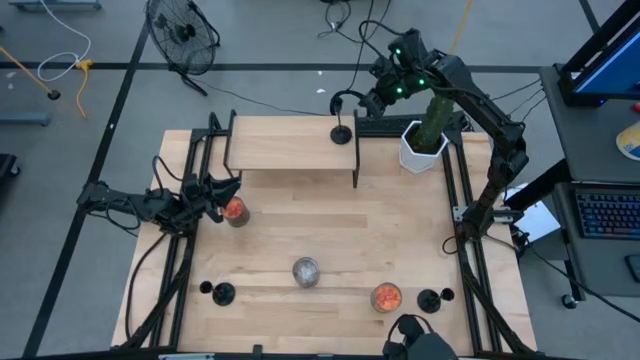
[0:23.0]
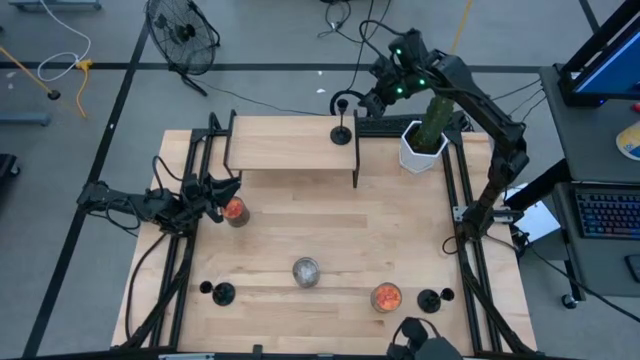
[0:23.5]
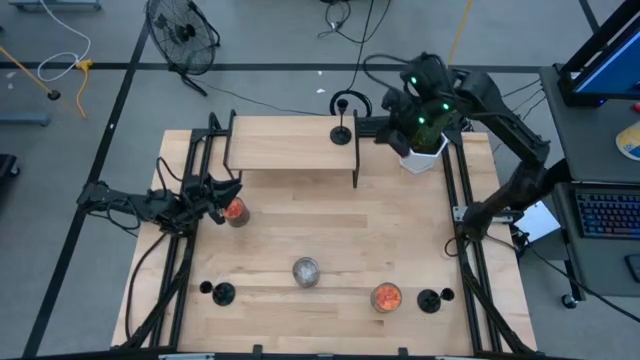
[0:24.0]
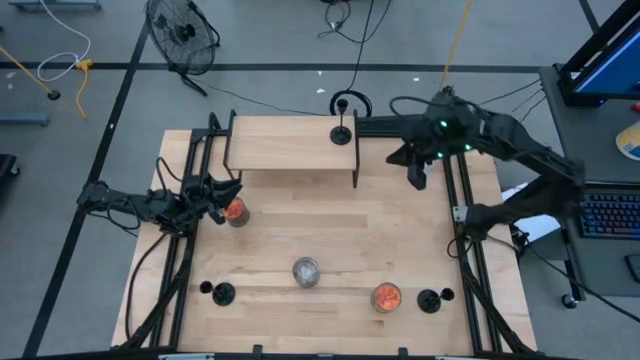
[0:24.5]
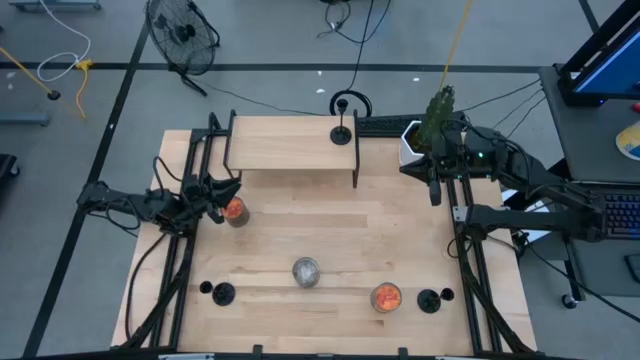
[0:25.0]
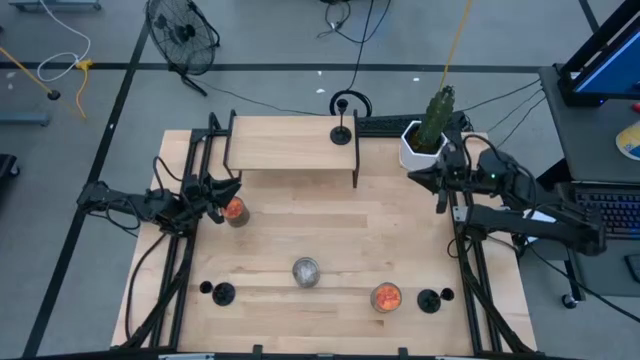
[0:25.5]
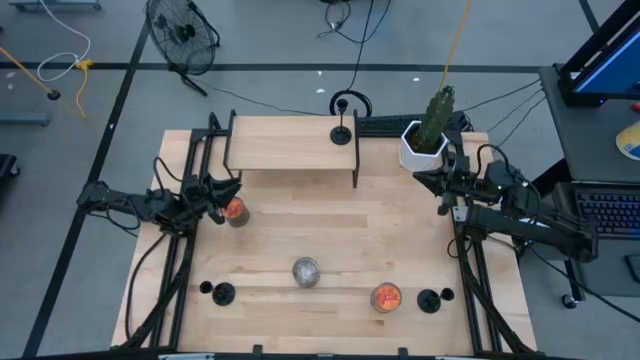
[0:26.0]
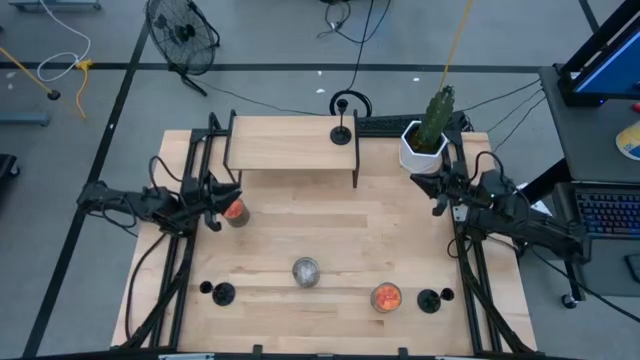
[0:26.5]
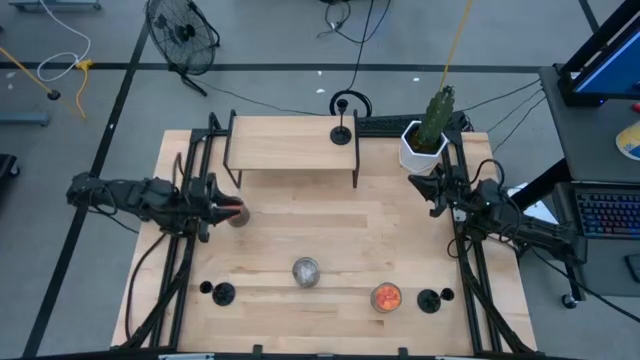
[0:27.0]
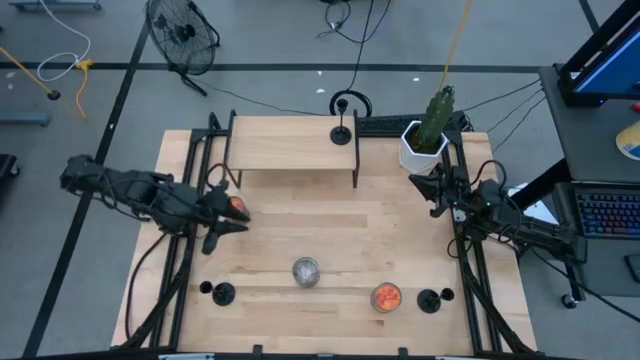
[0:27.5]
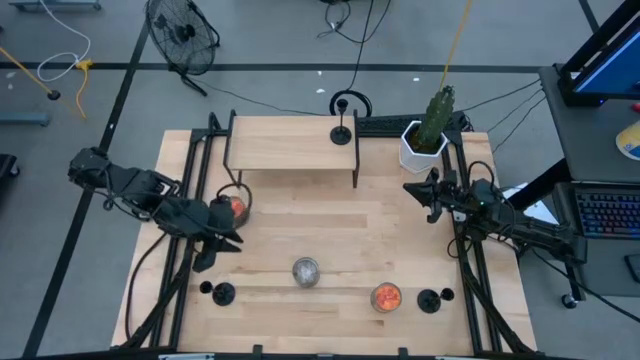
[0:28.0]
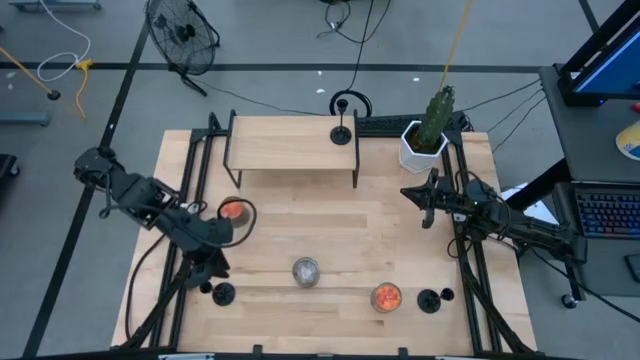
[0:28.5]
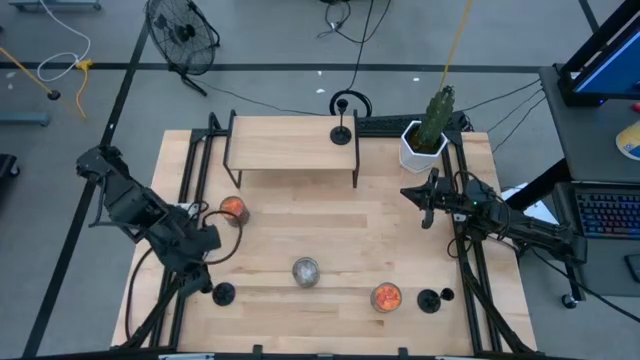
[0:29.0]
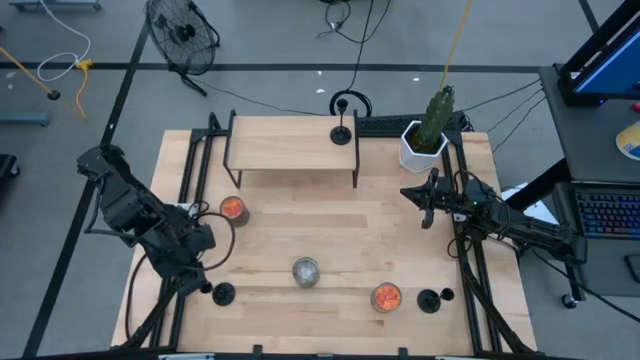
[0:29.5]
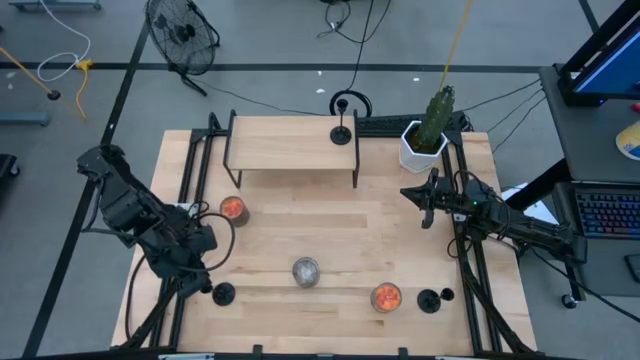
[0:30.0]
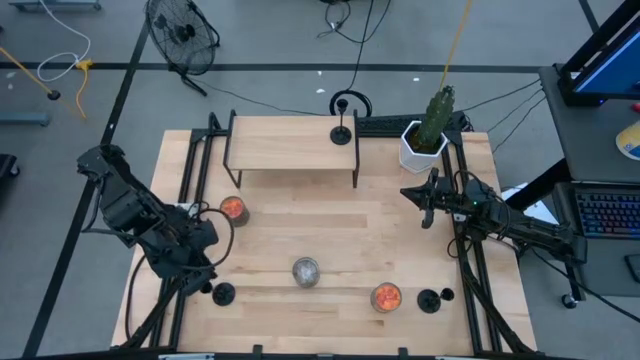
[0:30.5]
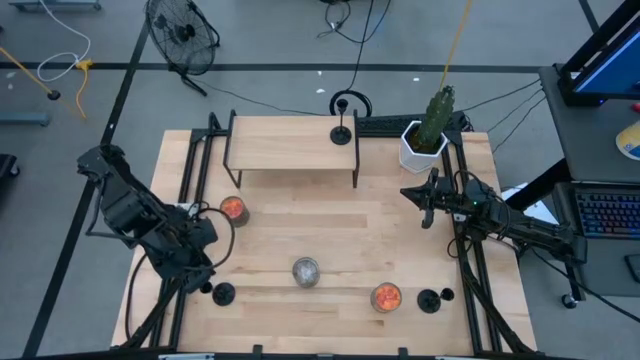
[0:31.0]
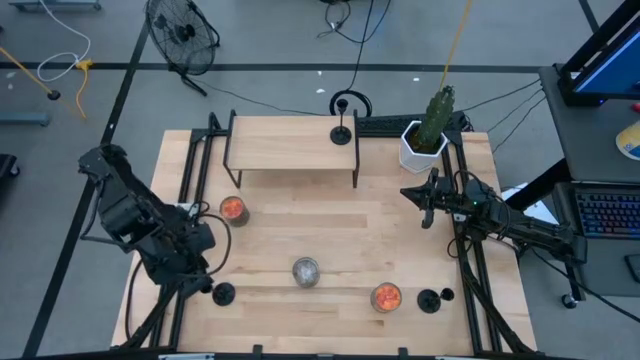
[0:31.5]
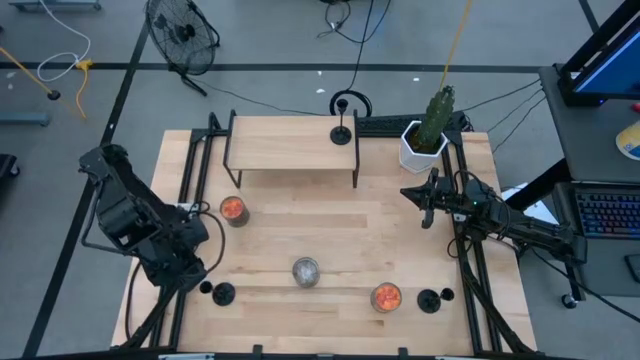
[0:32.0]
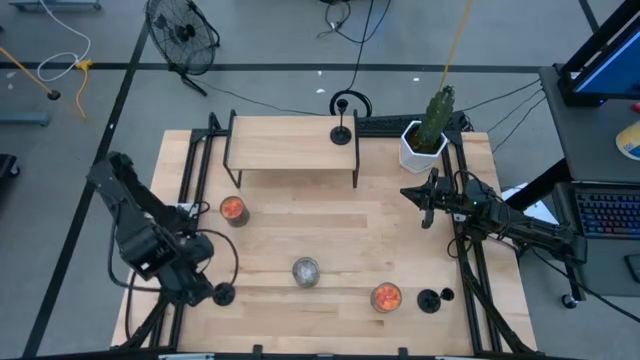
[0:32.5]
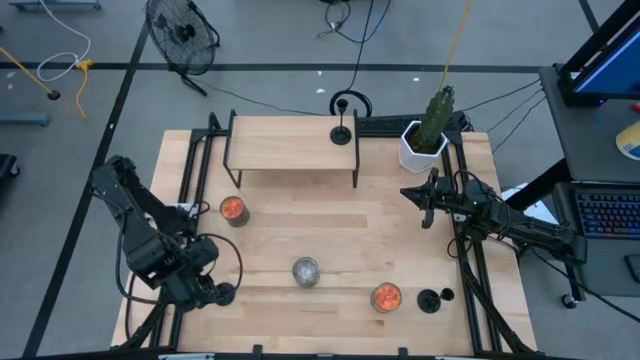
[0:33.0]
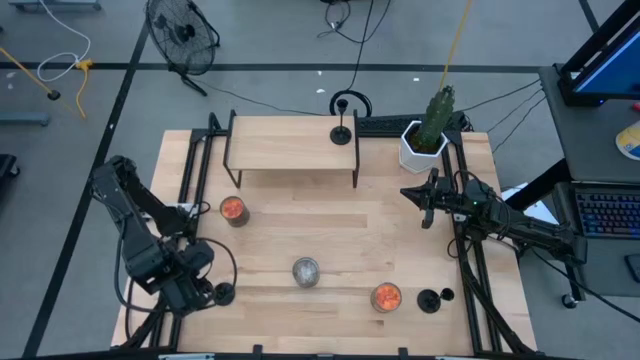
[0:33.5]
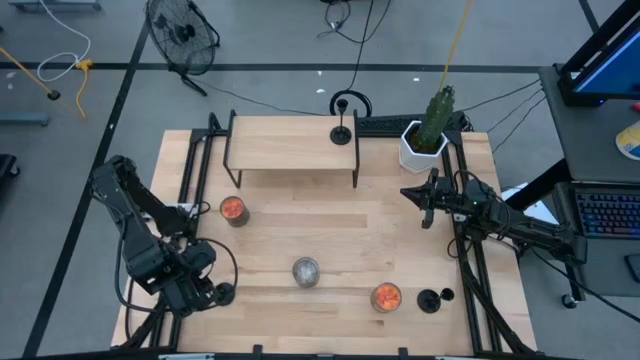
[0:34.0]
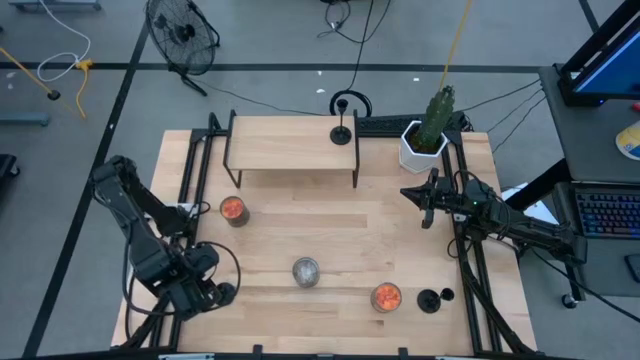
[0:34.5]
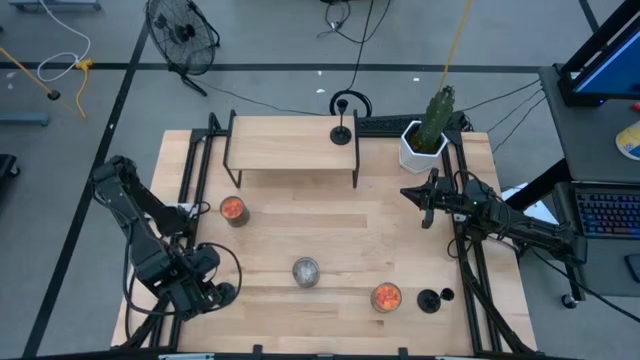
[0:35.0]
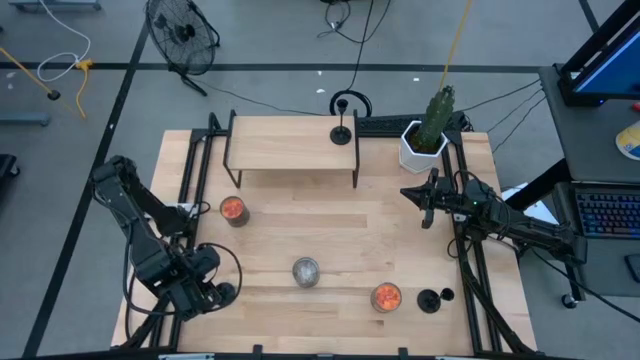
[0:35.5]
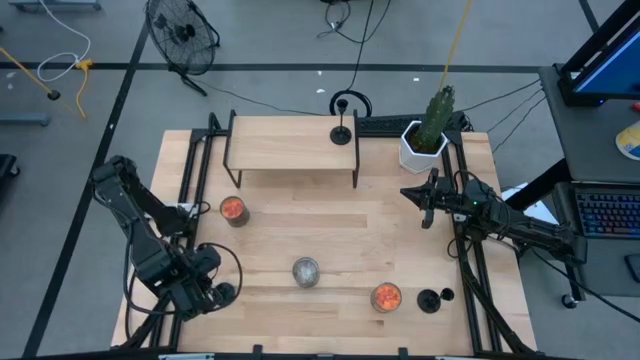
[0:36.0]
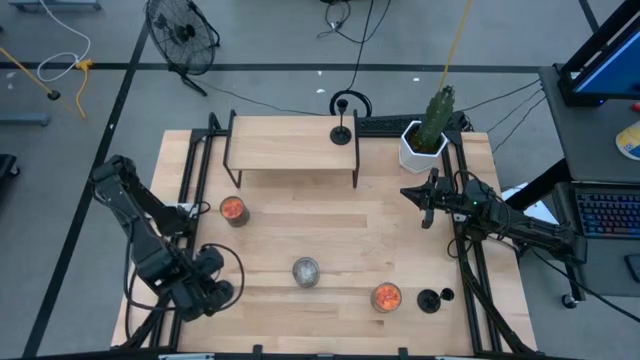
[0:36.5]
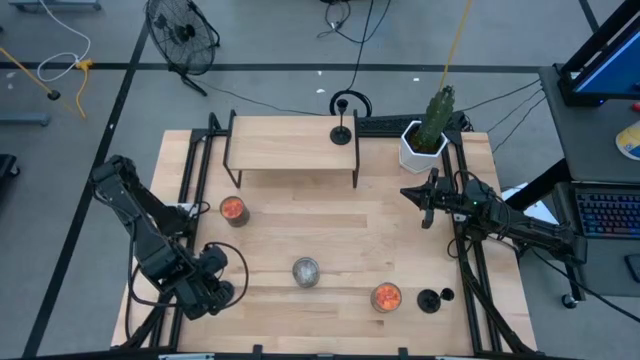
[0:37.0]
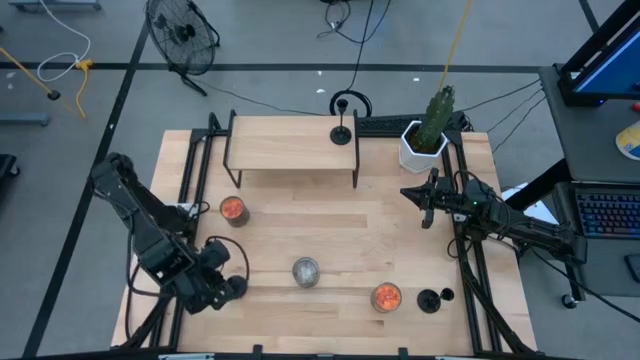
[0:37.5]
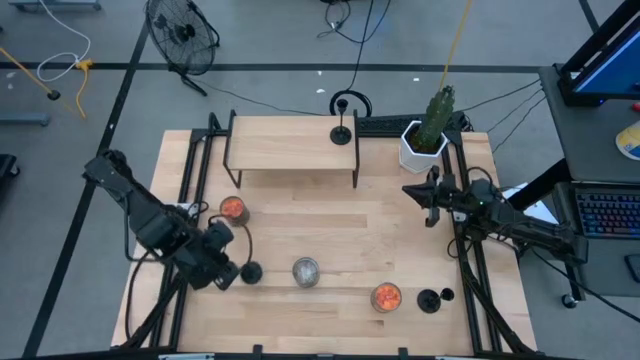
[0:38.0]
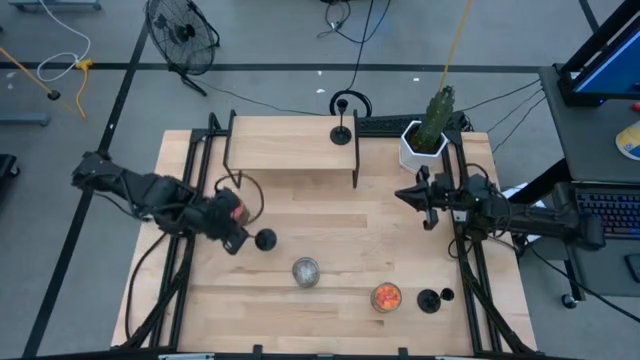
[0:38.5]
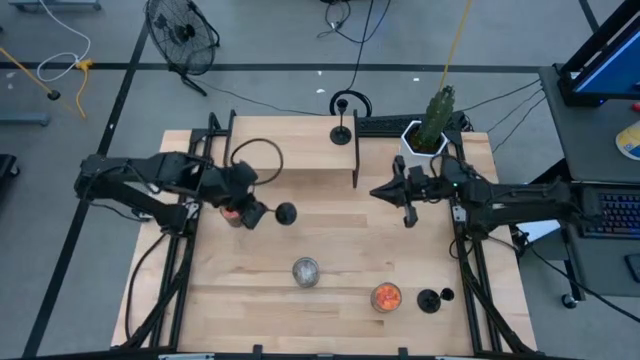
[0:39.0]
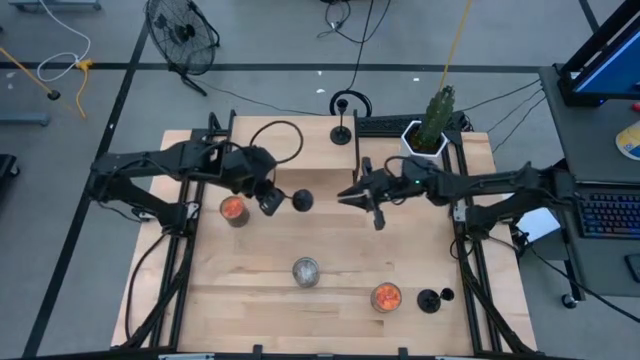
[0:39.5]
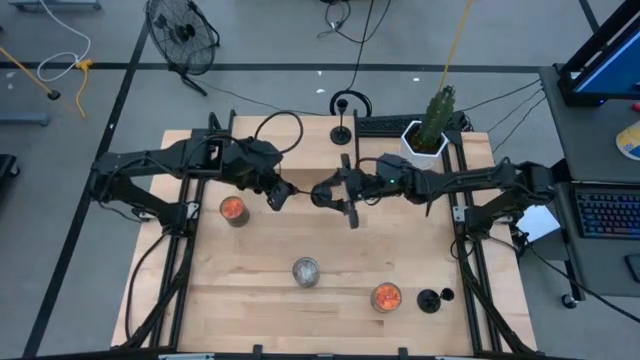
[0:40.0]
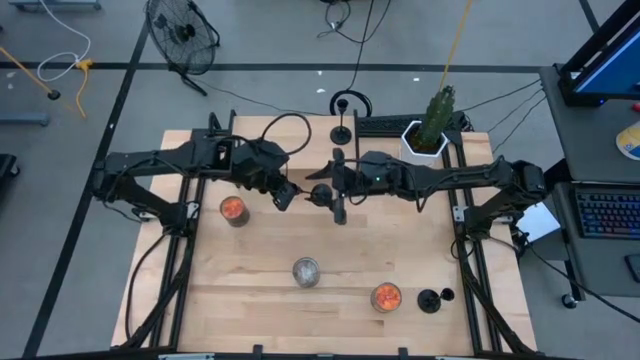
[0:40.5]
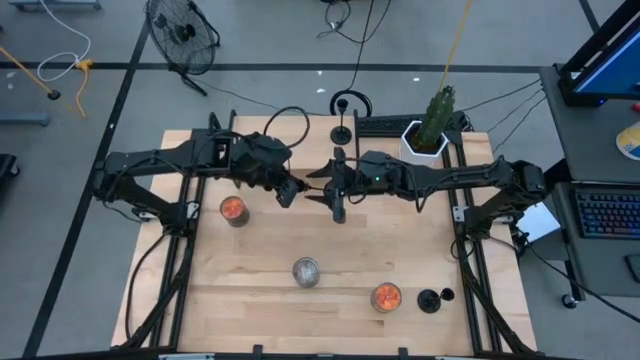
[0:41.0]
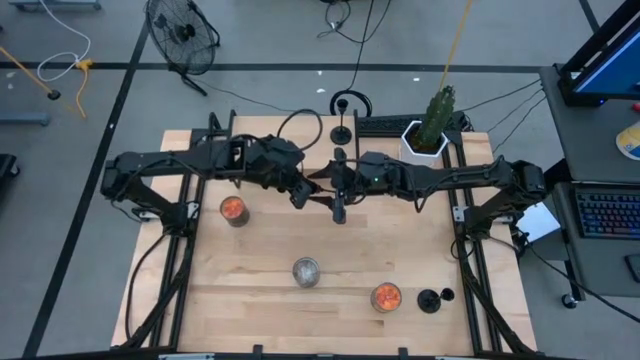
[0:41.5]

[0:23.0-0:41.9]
Task: Pick & Place candle stick holders
Put the left black candle holder on the shelf

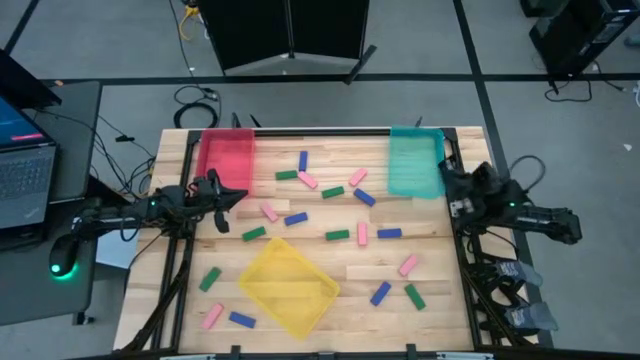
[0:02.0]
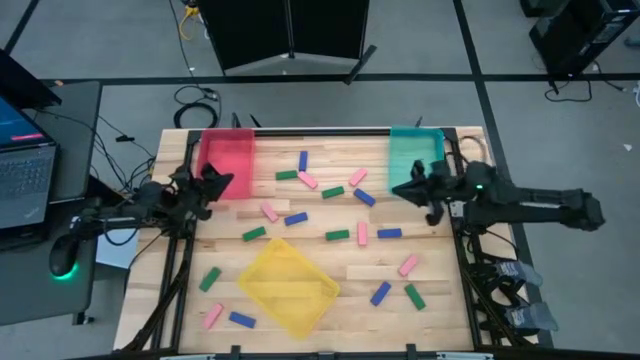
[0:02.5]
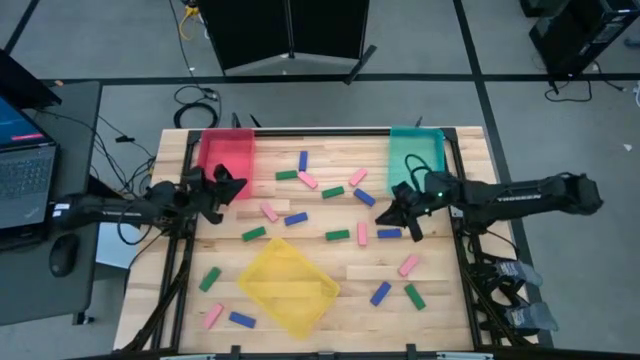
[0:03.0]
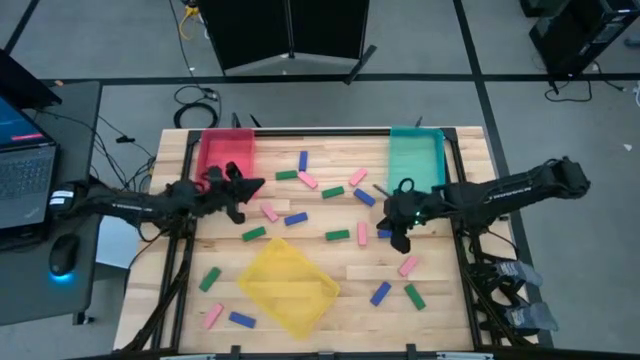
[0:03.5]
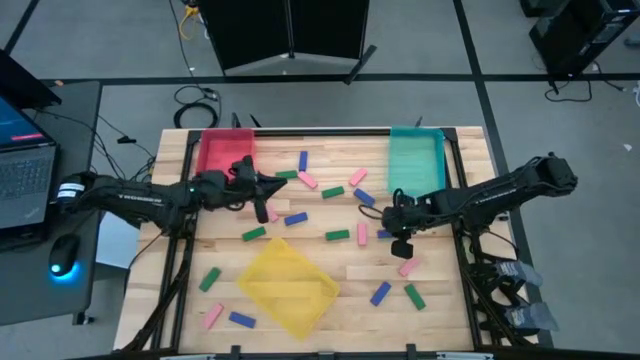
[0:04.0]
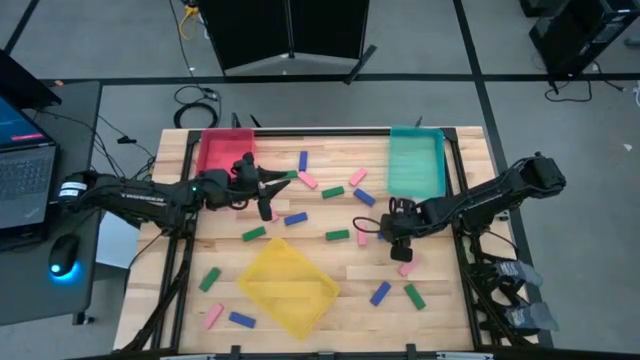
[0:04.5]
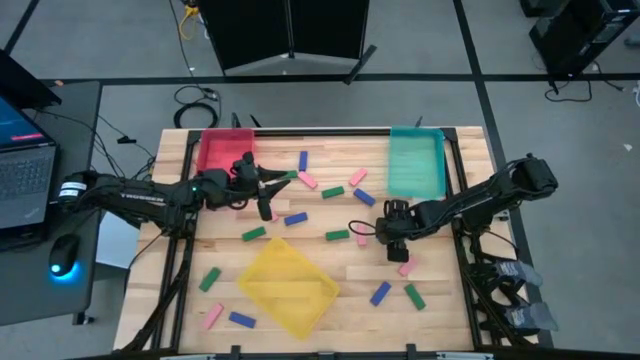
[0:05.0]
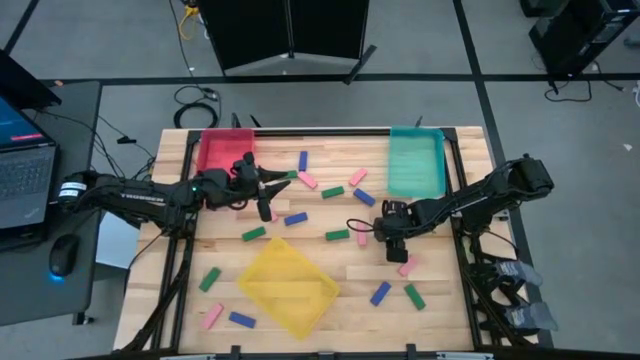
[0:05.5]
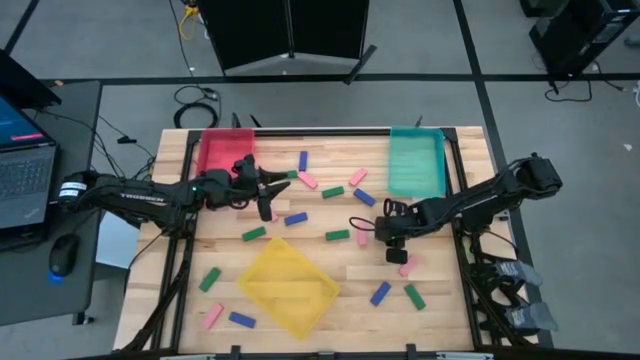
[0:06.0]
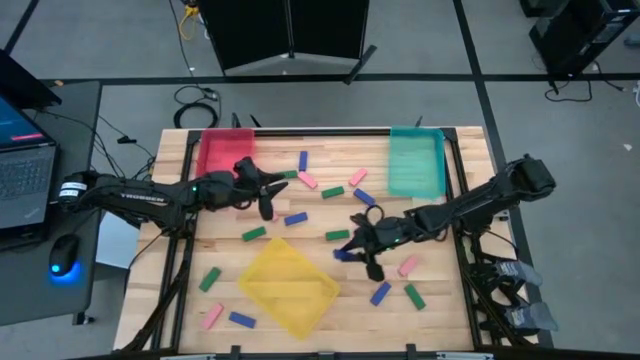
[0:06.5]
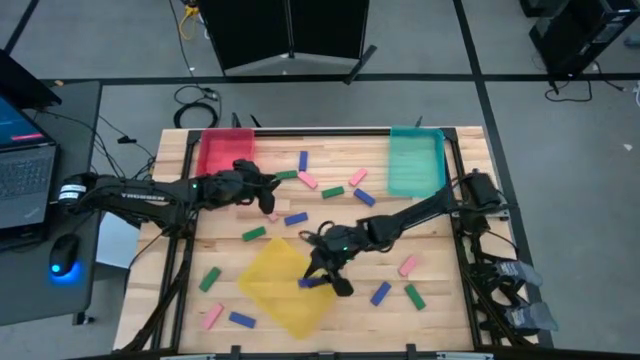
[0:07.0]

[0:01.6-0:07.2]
Task: Sort blocks
Put the blue block into the yellow bin
